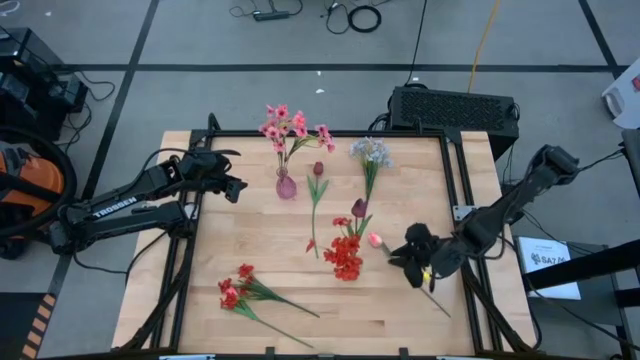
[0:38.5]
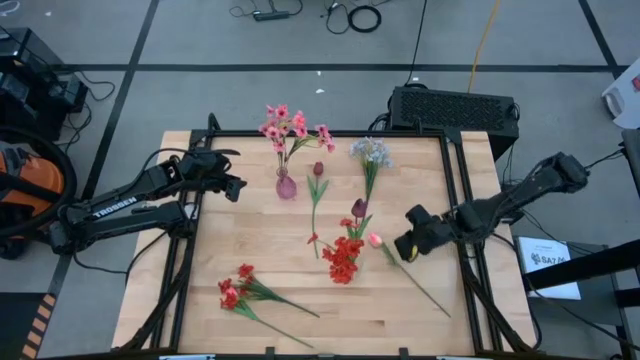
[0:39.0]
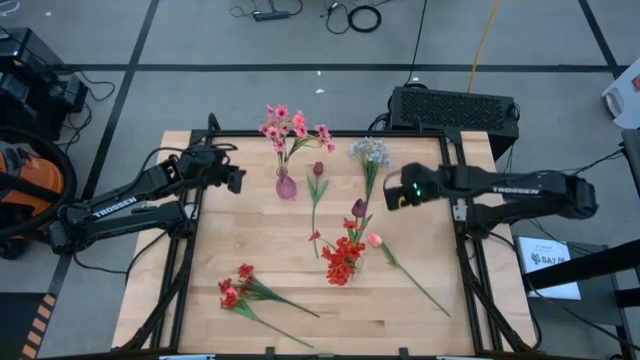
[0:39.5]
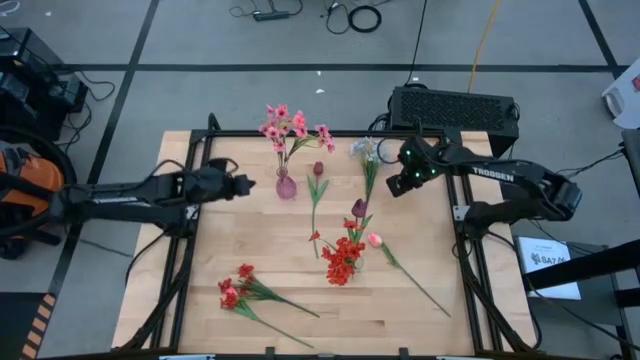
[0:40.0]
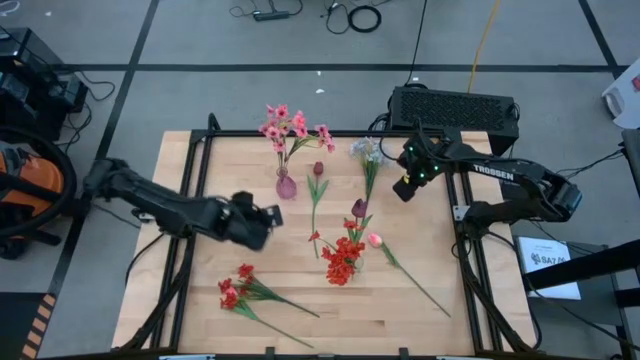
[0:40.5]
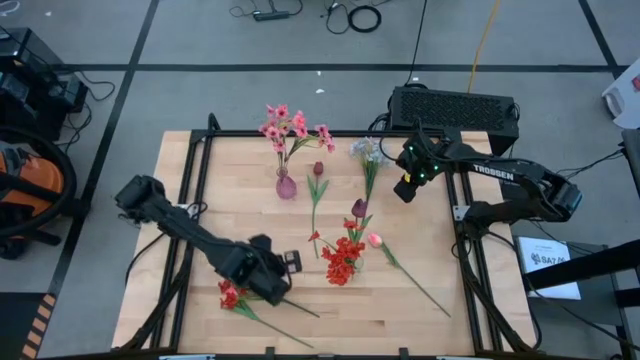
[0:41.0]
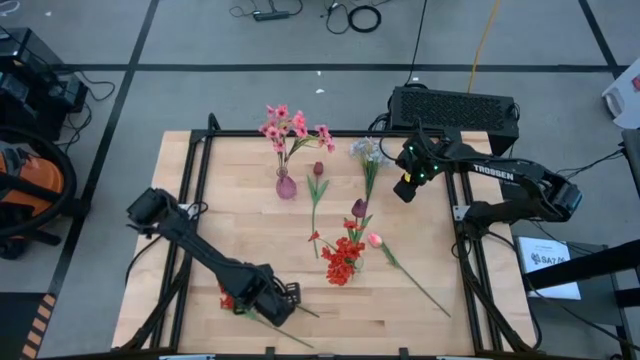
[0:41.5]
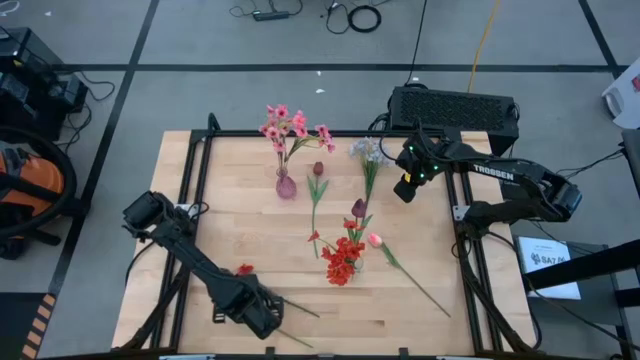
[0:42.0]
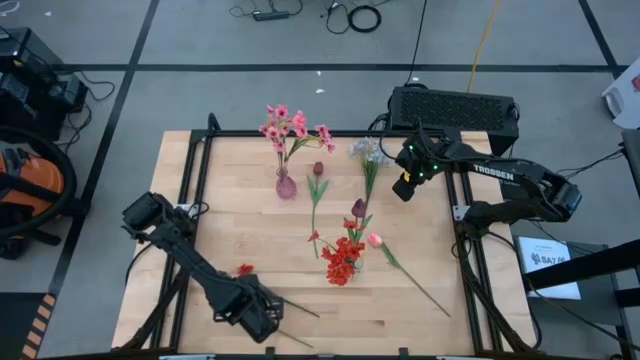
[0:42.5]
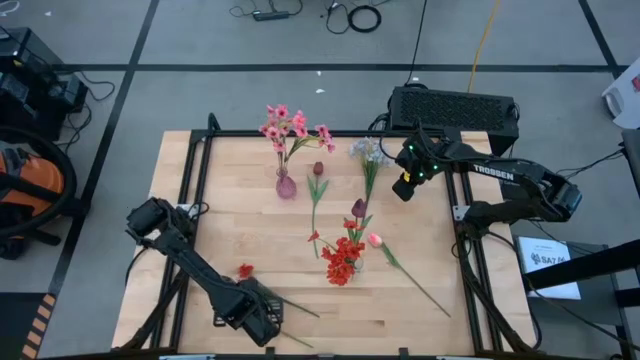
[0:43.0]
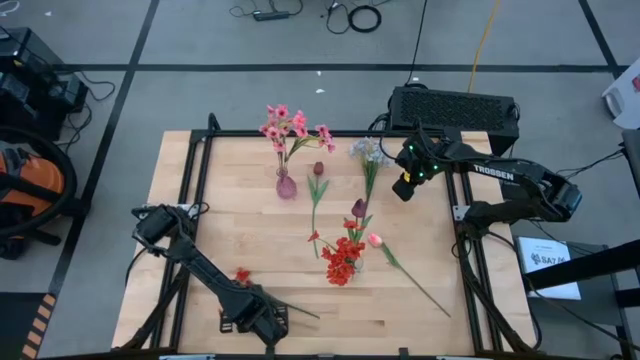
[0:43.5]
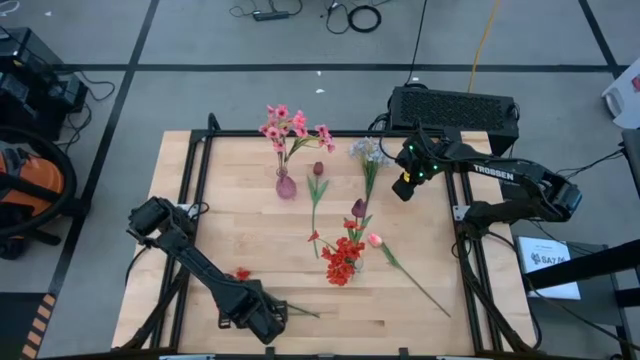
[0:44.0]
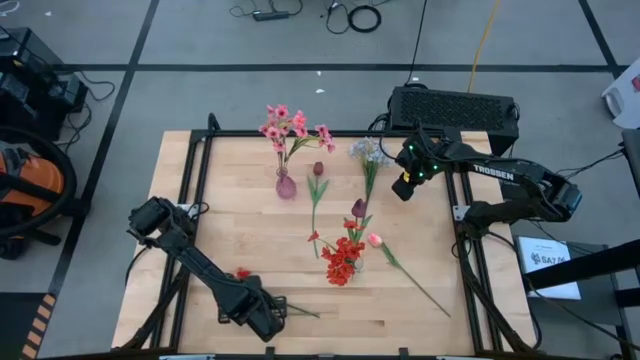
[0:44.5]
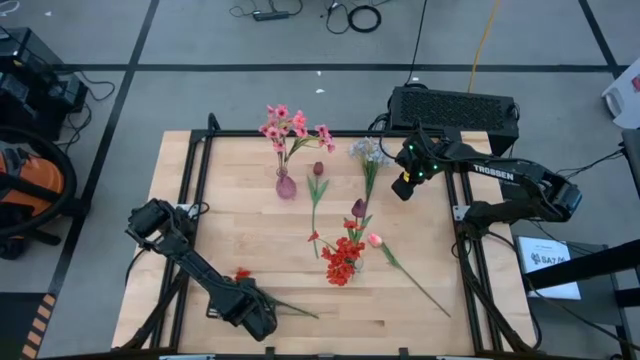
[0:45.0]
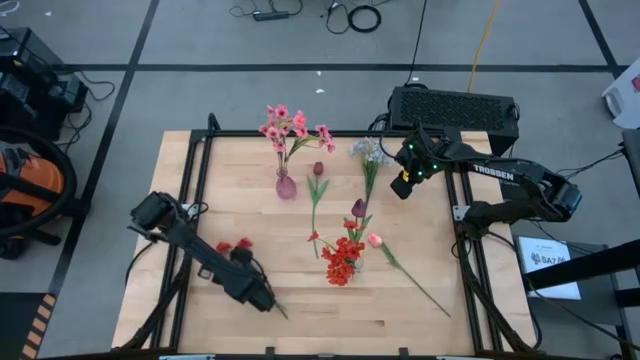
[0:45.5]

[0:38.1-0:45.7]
Task: Sort flowers into vase by color
Put the left pink tulip into the light violet flower vase

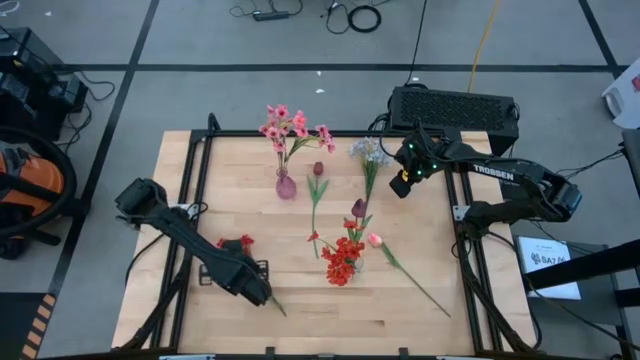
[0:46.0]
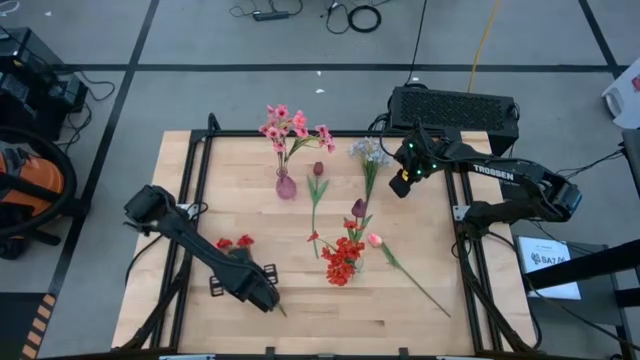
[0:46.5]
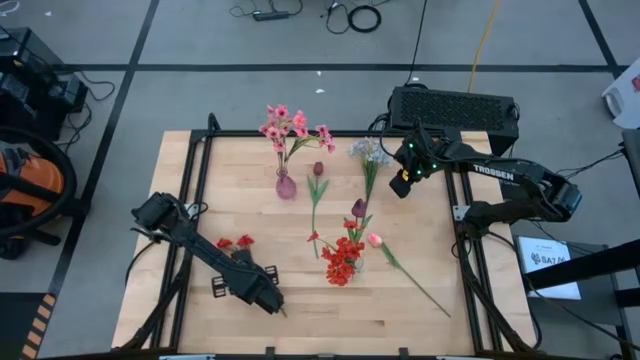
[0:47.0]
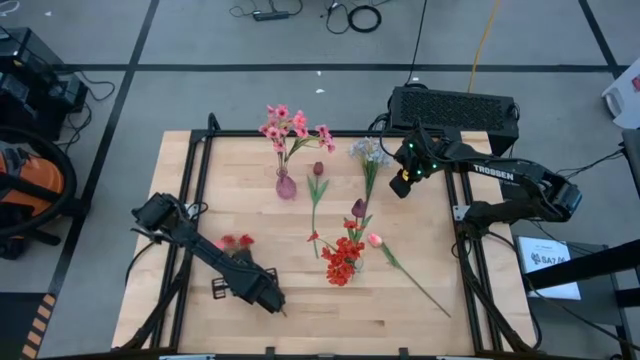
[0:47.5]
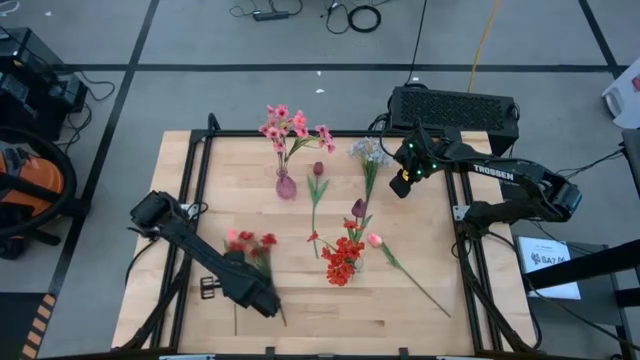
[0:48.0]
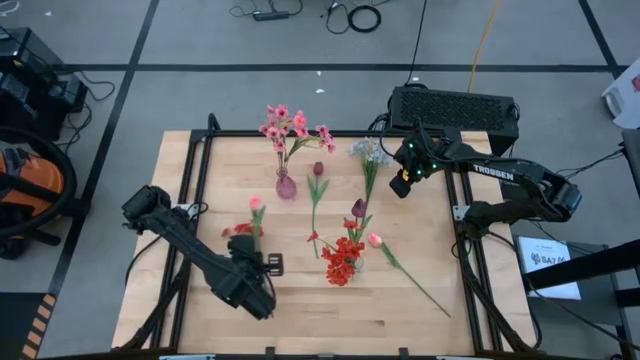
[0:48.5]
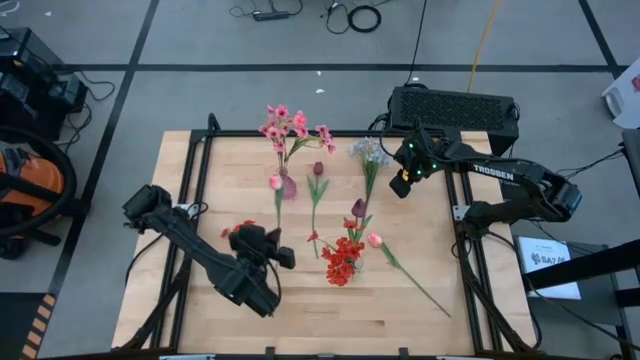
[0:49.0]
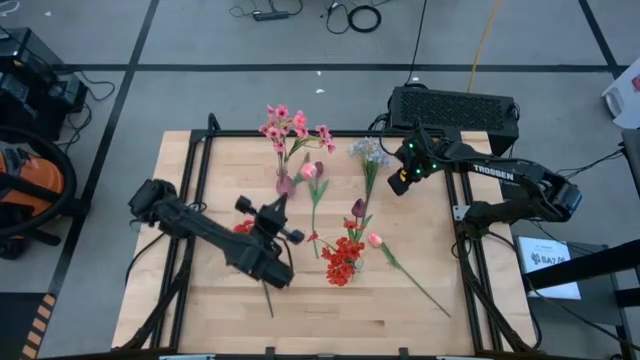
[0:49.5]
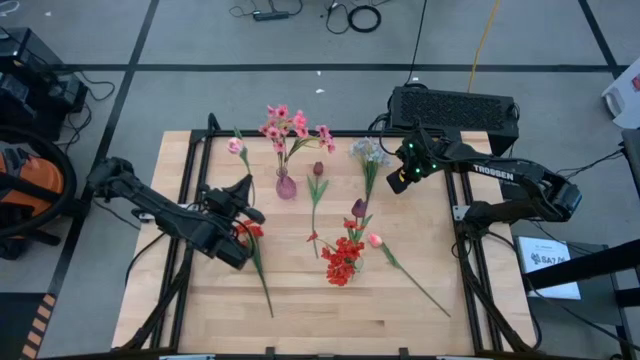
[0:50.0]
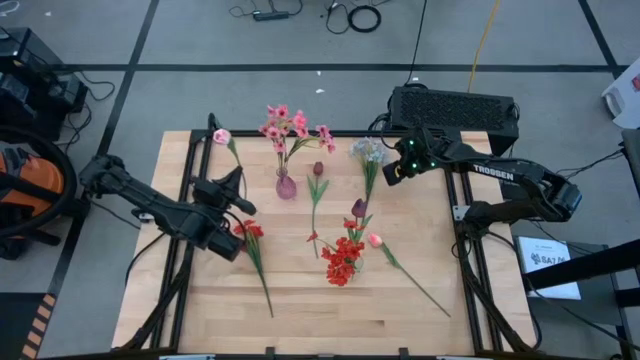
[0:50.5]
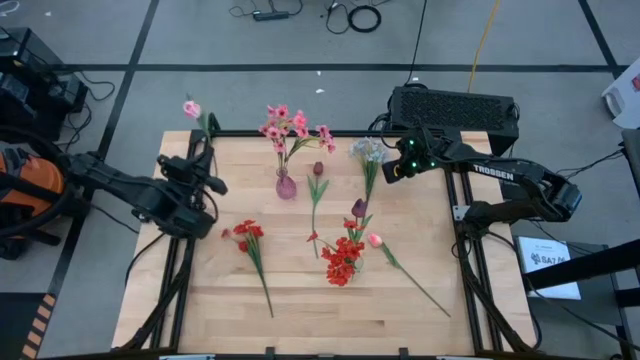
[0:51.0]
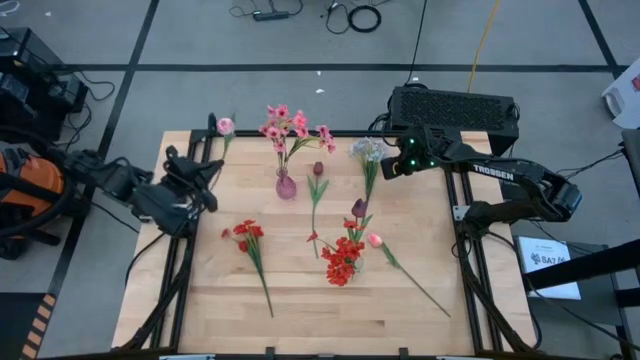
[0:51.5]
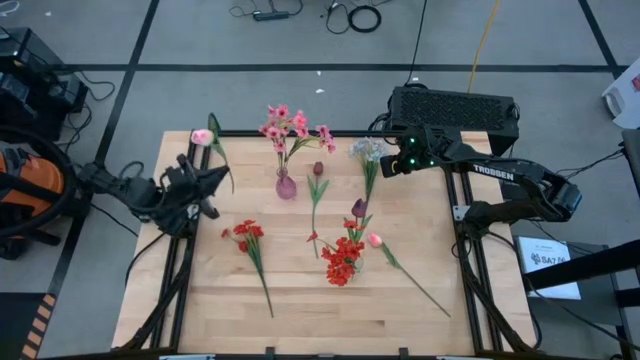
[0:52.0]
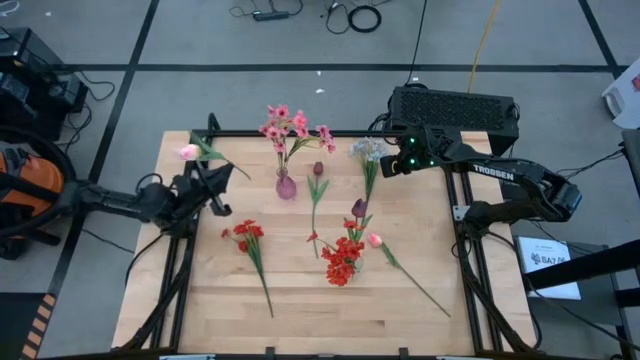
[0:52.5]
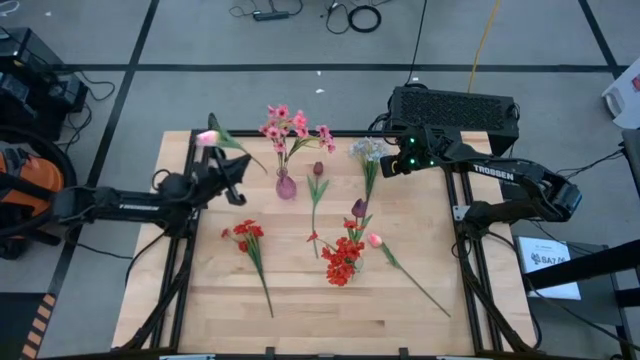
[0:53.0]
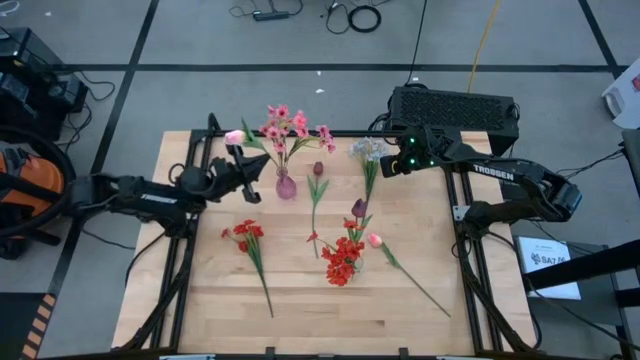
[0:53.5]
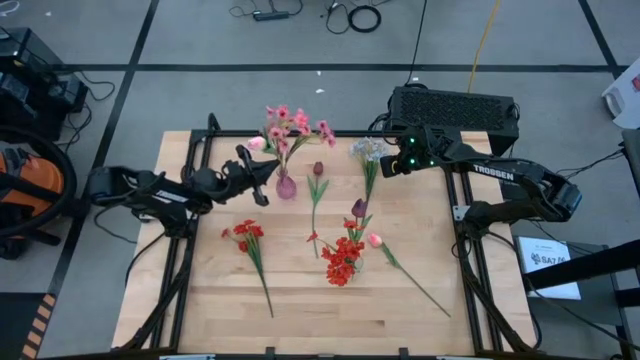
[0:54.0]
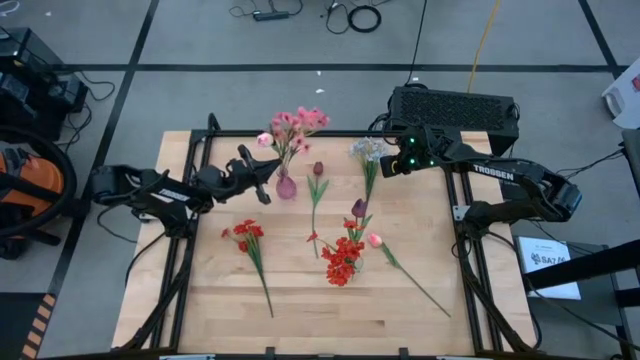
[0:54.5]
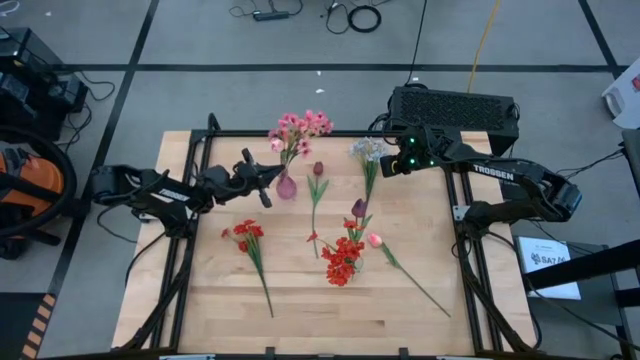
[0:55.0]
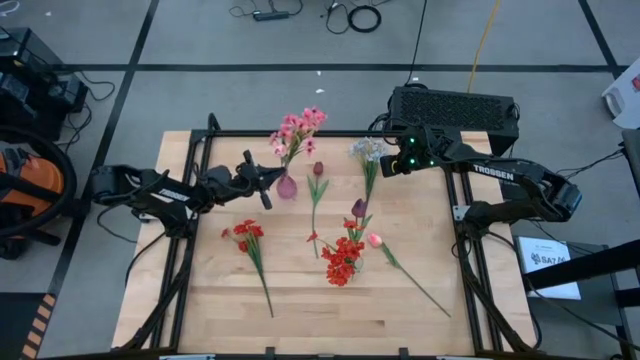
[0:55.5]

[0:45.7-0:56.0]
Put the left pink tulip into the light violet flower vase

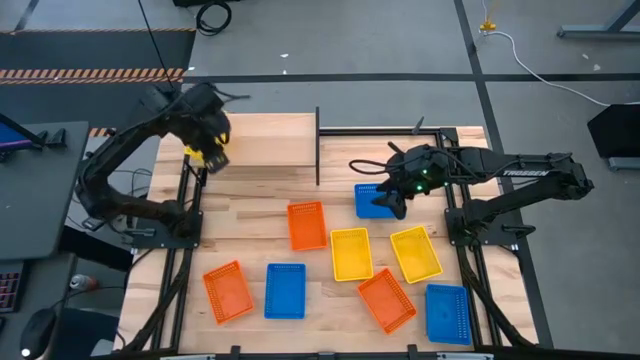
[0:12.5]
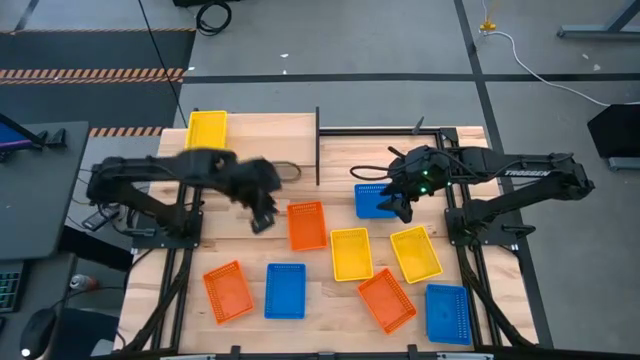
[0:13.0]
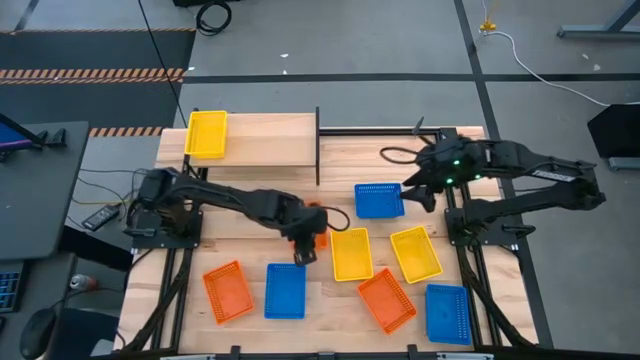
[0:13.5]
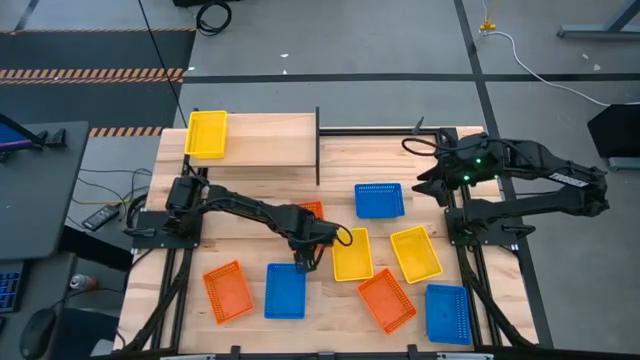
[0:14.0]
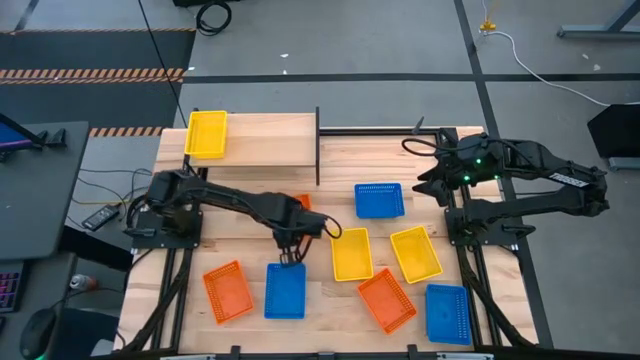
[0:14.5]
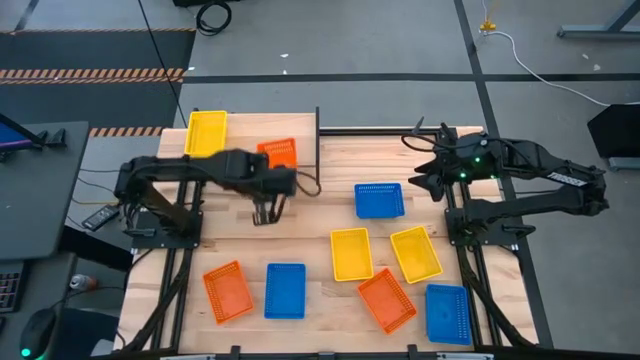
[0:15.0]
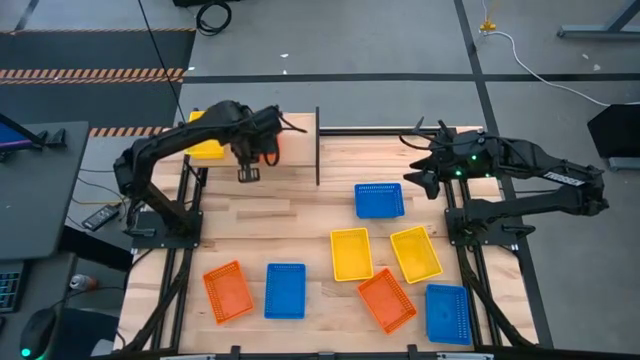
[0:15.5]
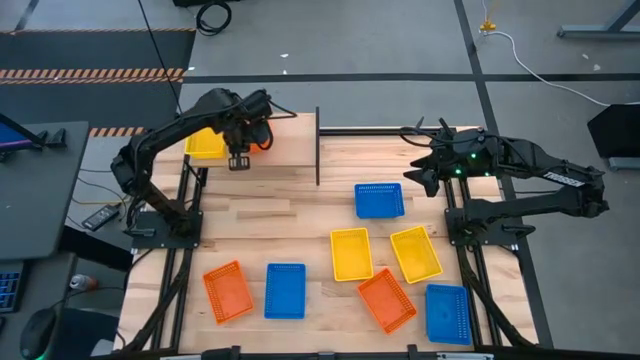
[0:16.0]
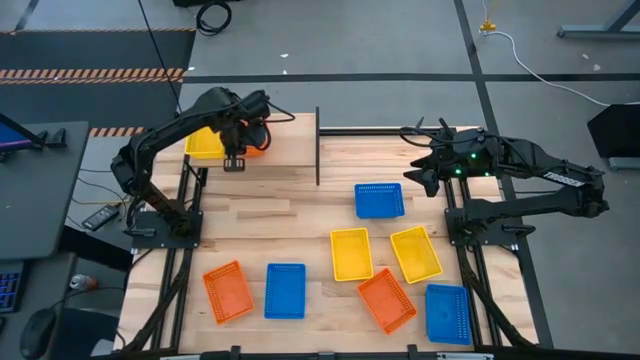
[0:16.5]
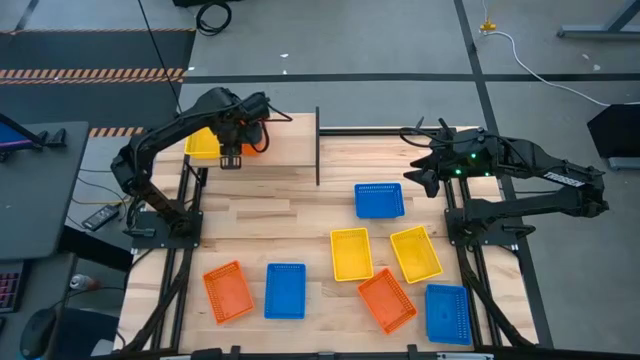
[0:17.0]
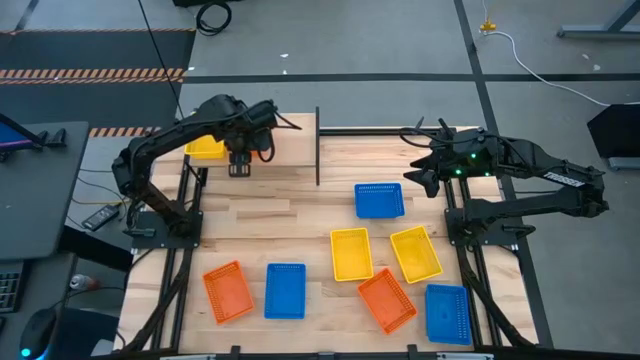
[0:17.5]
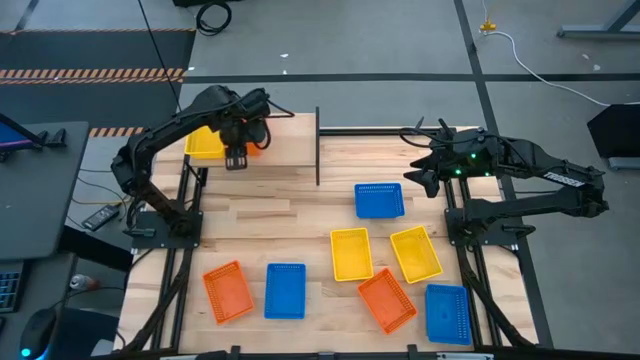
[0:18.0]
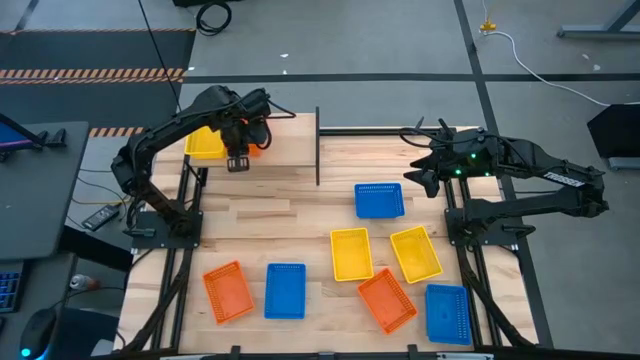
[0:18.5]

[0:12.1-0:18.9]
Task: Stack baskets on shelf by color
Put the top orange bin on the shelf
